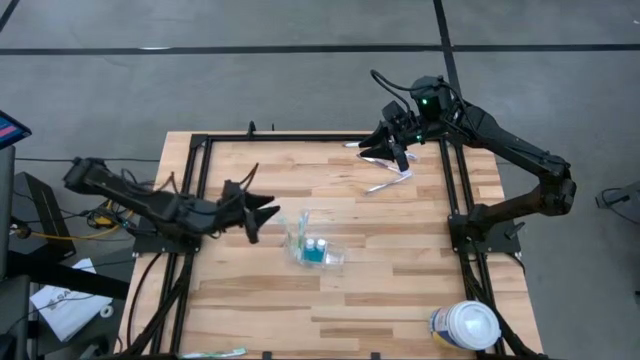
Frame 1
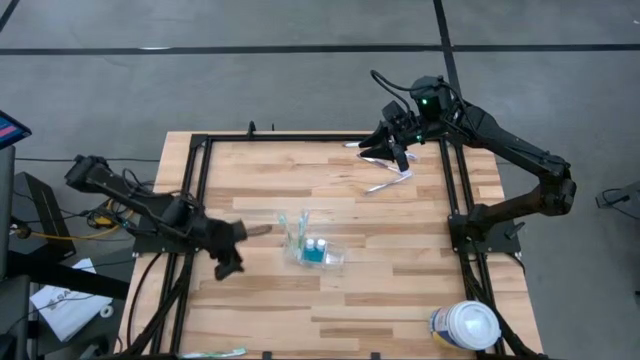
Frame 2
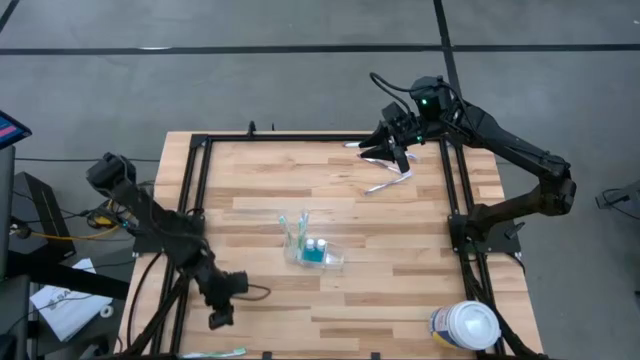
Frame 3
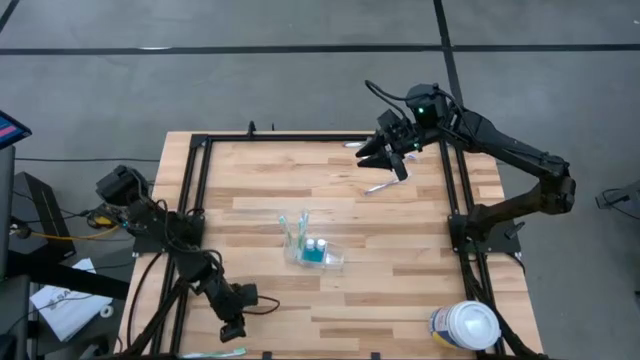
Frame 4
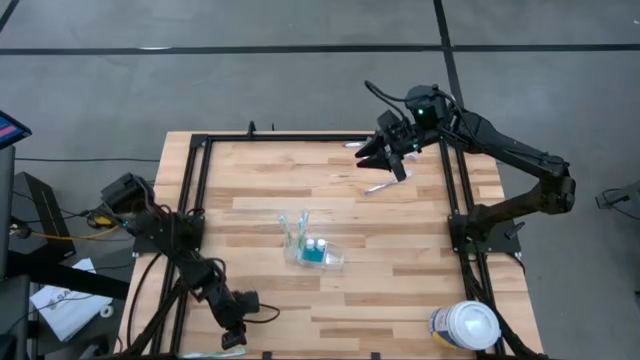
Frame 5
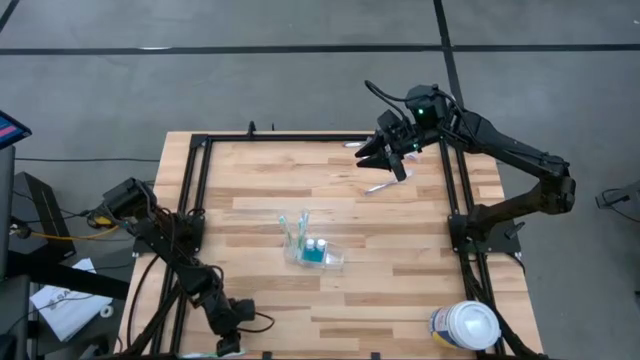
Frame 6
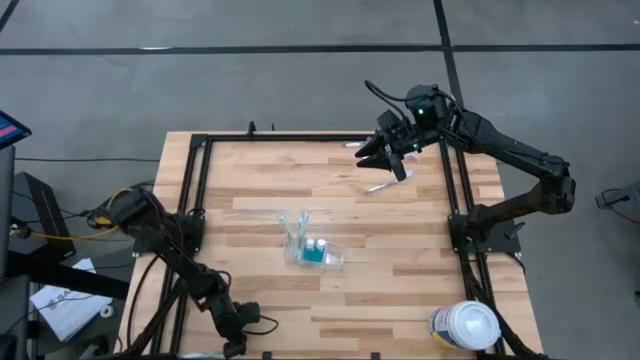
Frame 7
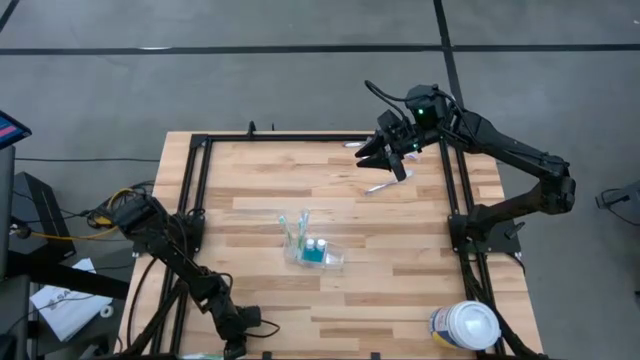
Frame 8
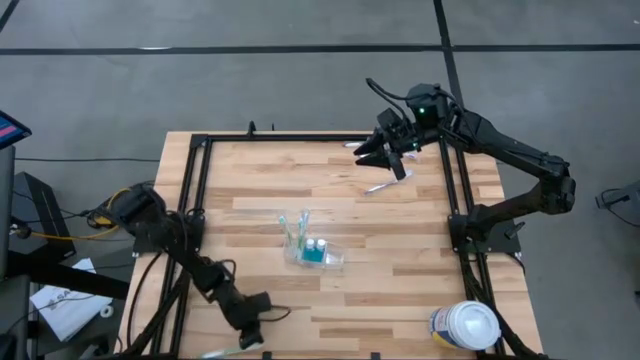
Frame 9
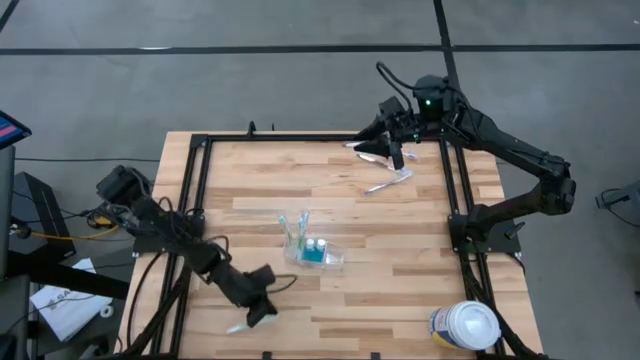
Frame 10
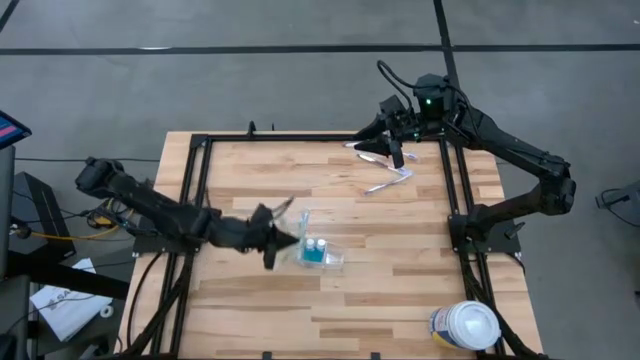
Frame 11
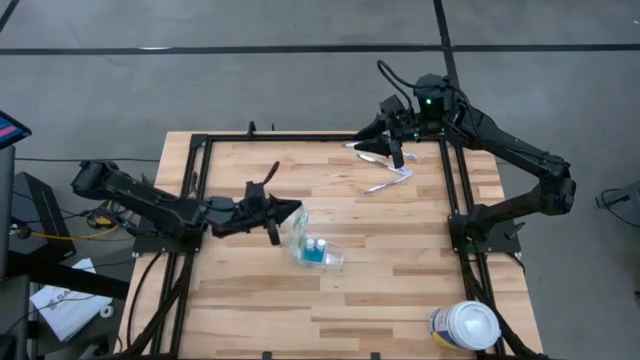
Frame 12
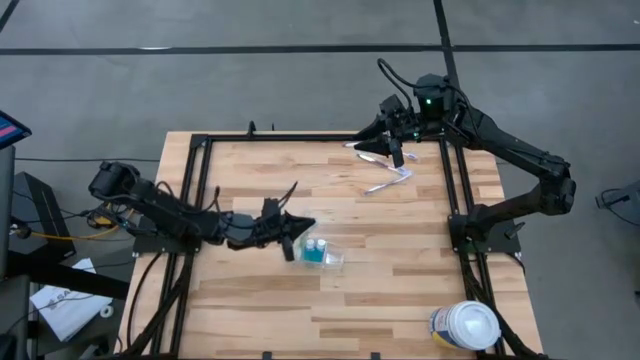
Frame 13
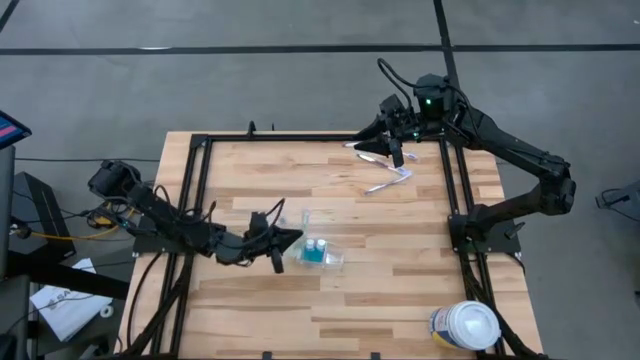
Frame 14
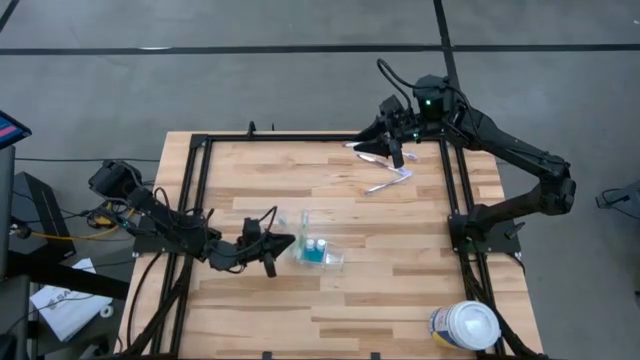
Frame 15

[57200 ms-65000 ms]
Task: Pick & Place toothbrushing station
Put the green toothbrush into the transparent organizer

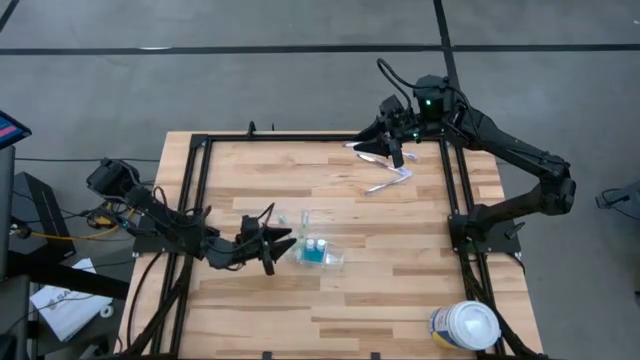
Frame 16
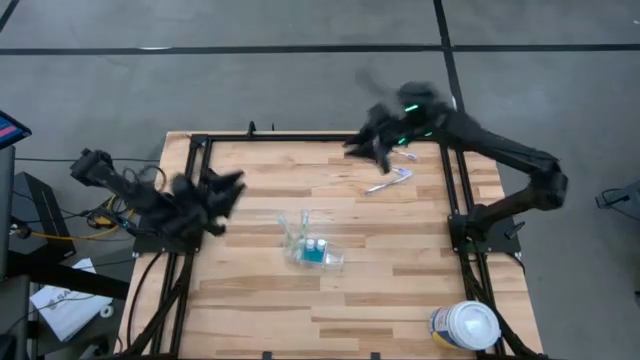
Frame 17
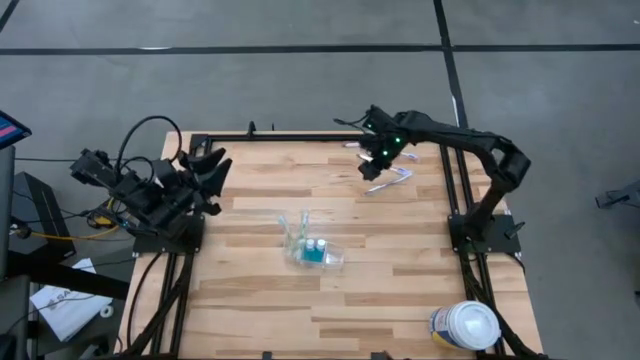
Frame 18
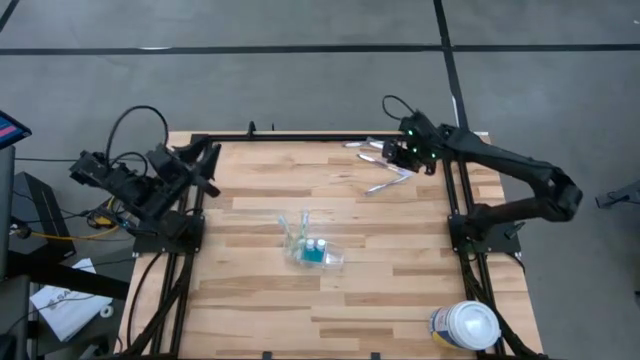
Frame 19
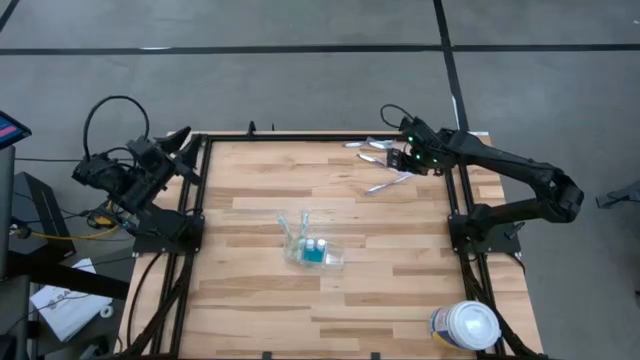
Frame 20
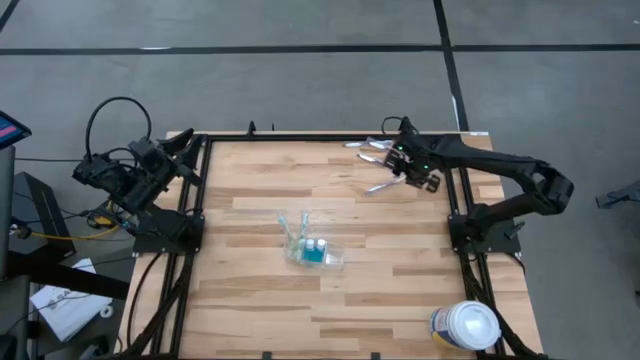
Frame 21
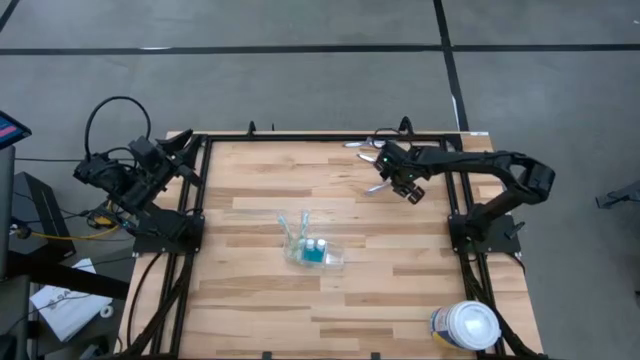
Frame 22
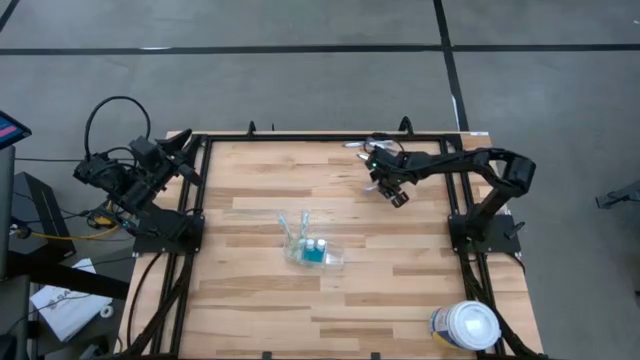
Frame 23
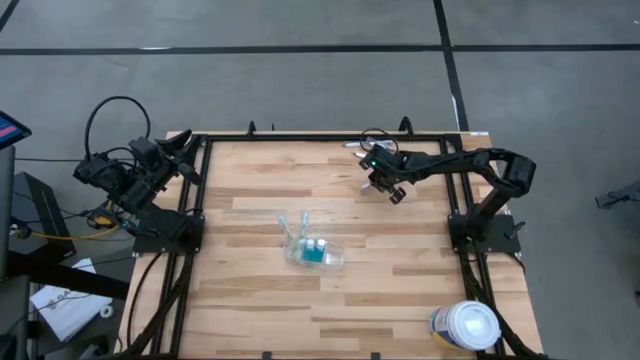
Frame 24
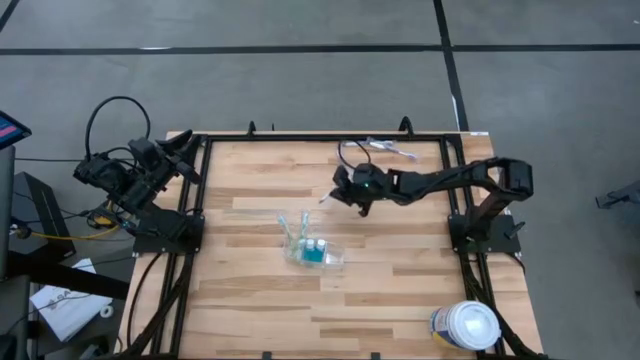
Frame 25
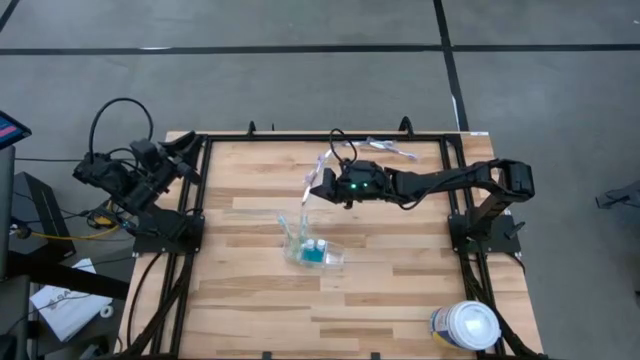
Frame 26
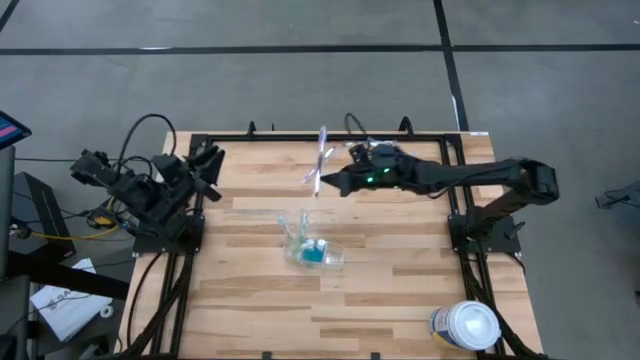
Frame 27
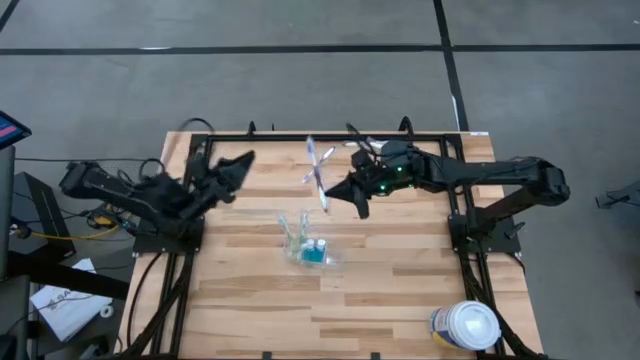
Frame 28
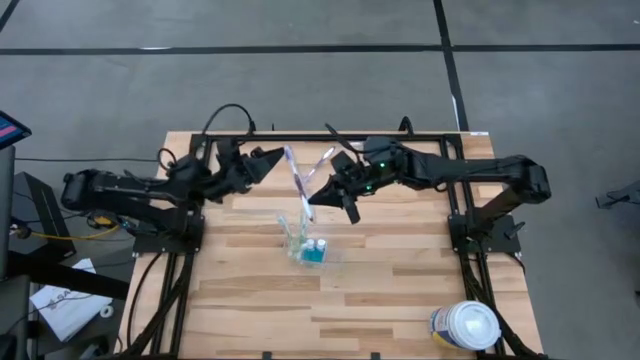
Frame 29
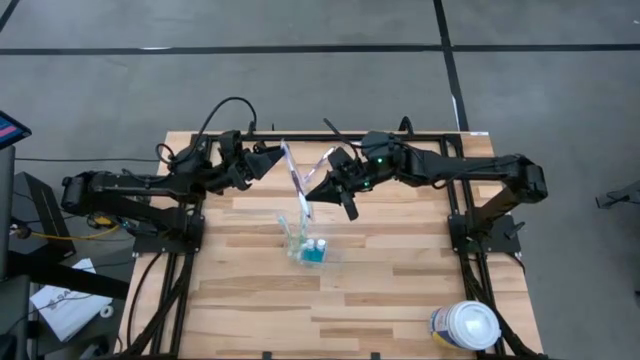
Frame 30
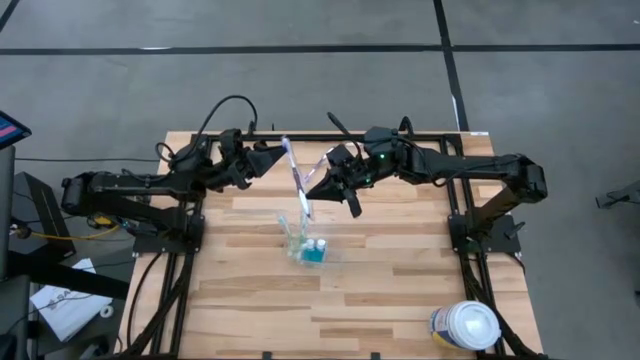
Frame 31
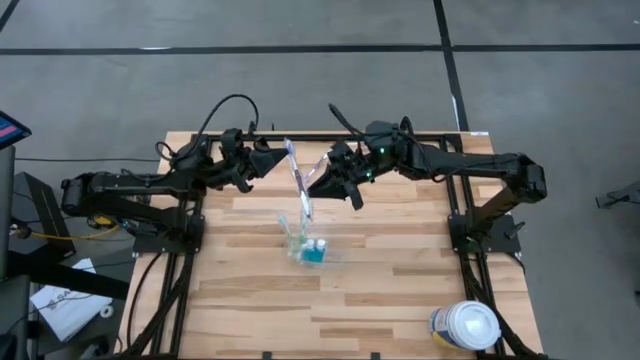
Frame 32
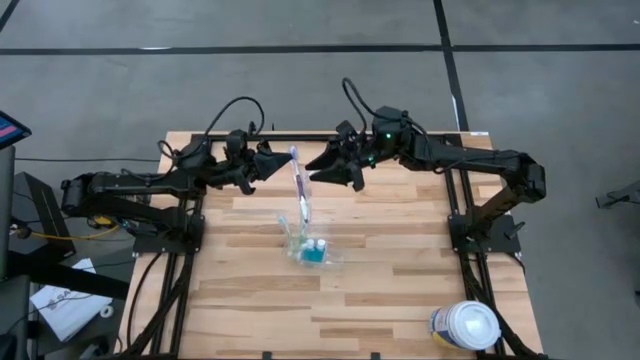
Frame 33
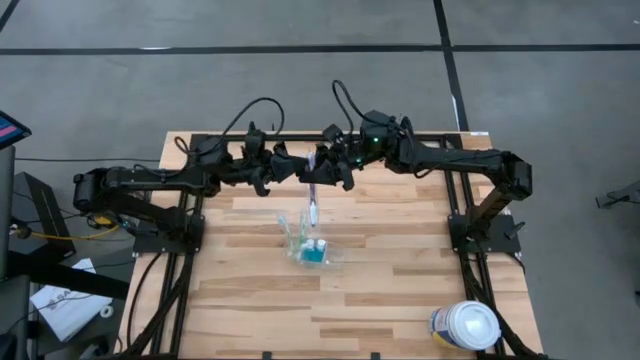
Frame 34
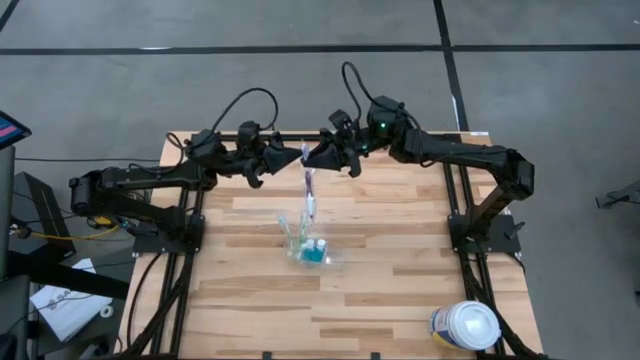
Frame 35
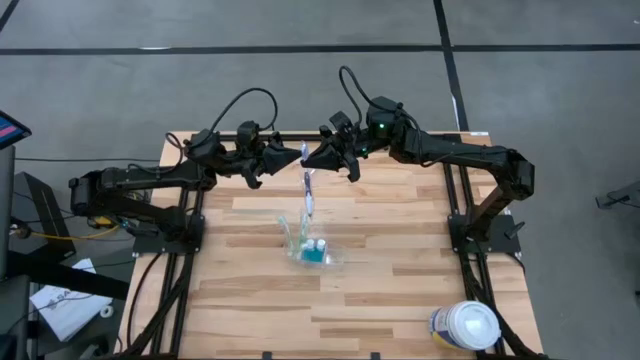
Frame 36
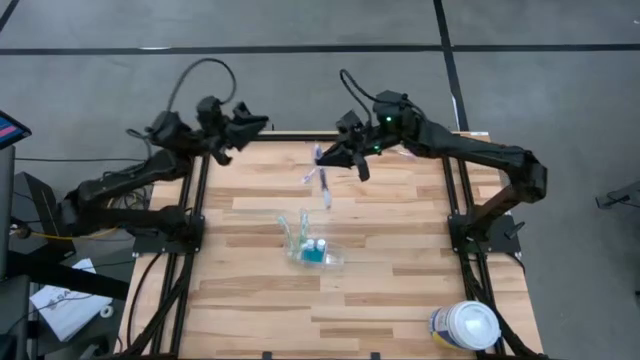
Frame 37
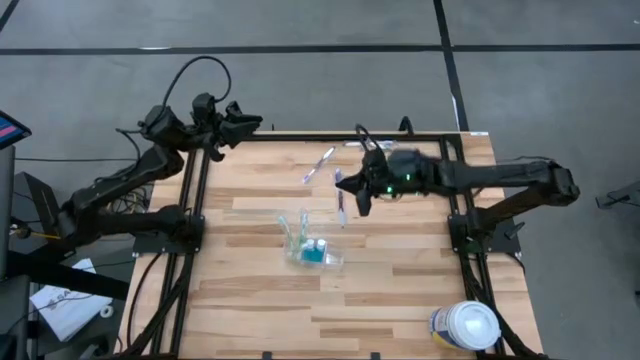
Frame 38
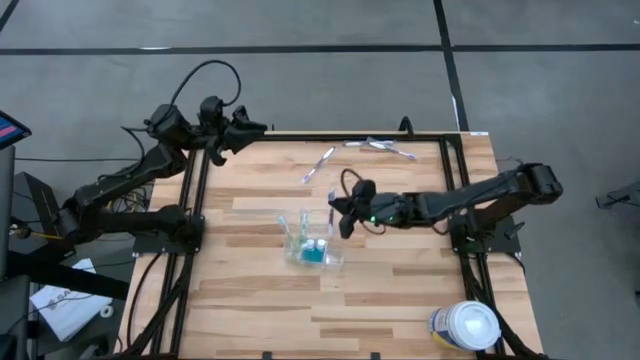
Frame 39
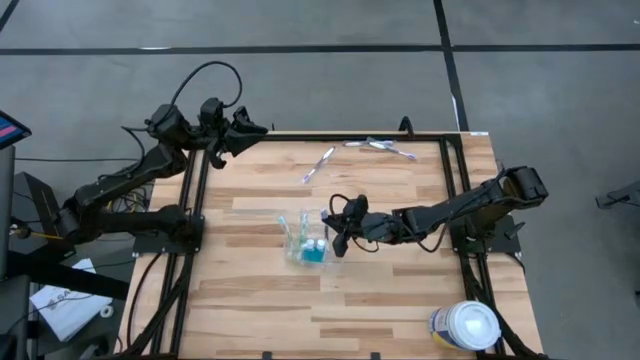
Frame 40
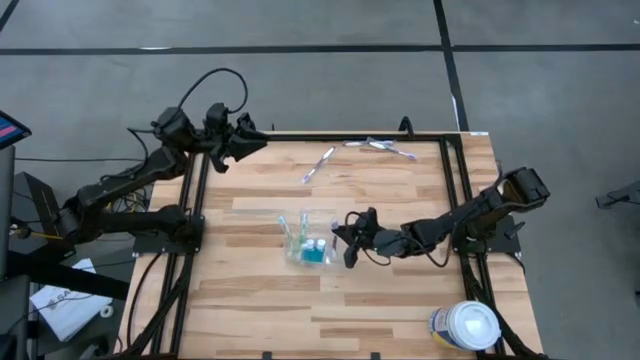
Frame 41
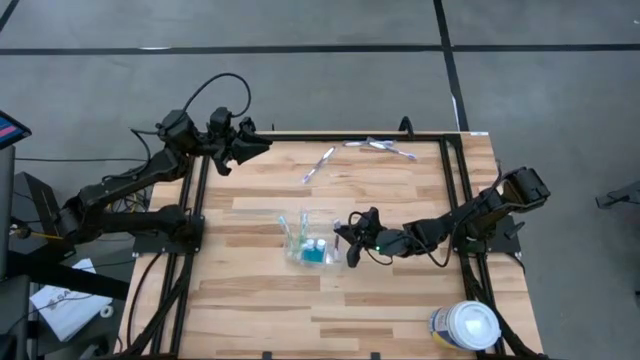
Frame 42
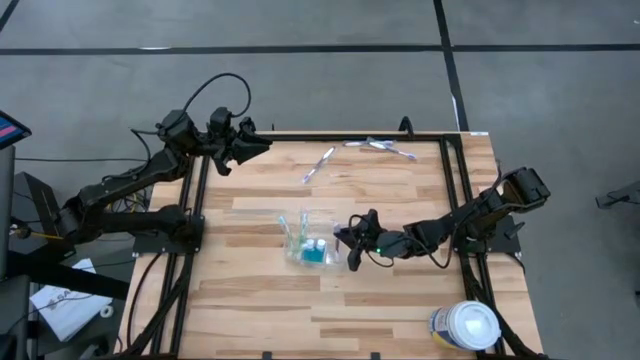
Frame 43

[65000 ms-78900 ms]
Put the purple toothbrush into the transparent organizer
